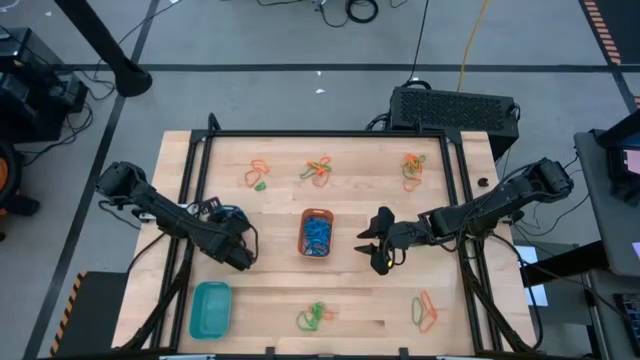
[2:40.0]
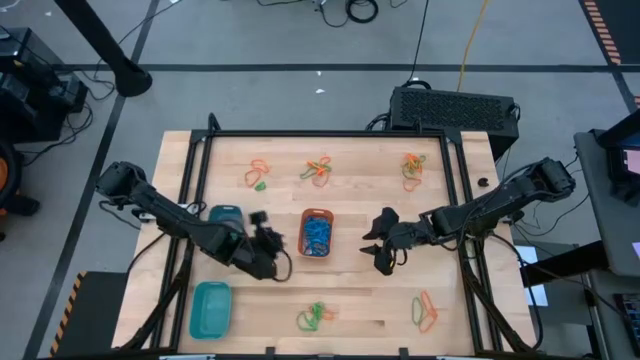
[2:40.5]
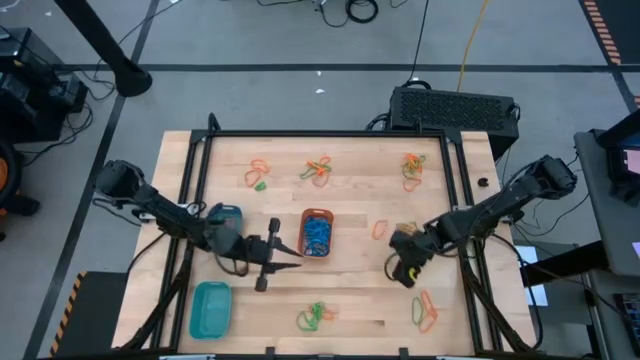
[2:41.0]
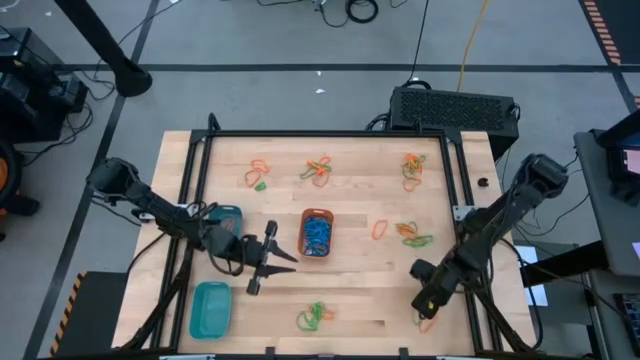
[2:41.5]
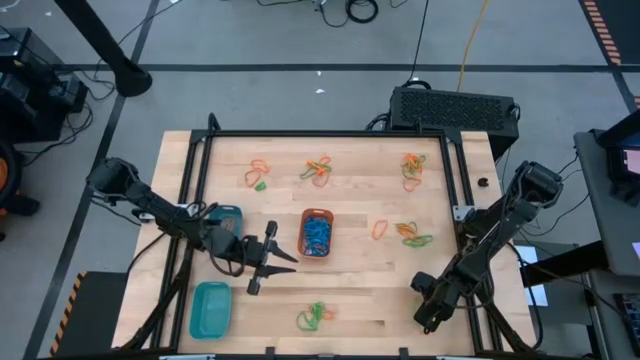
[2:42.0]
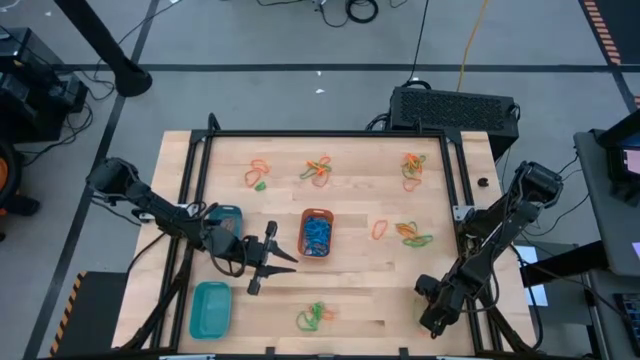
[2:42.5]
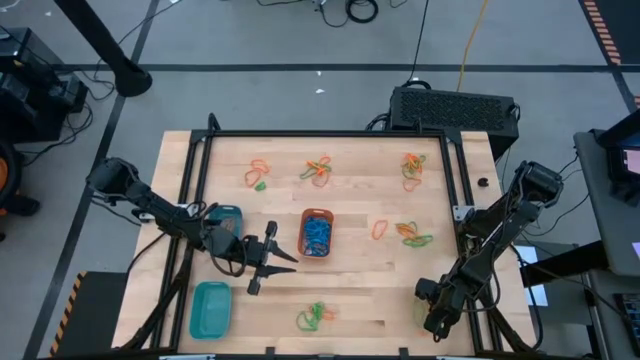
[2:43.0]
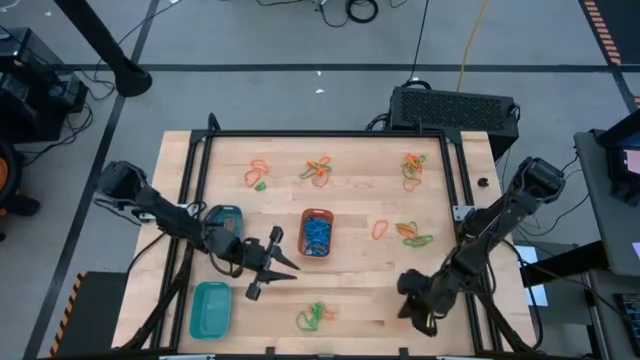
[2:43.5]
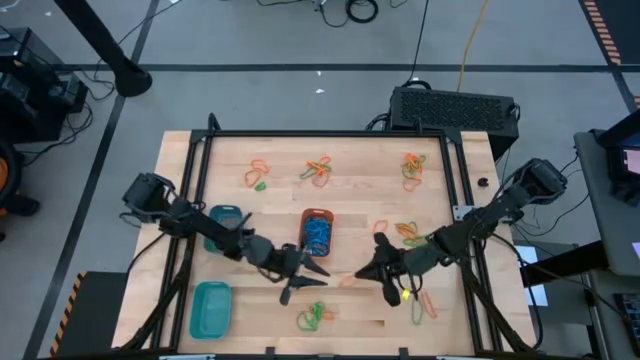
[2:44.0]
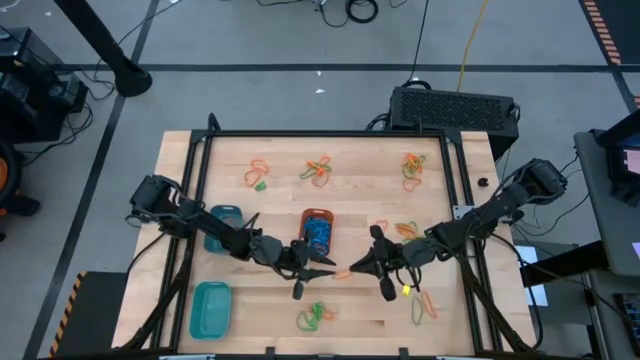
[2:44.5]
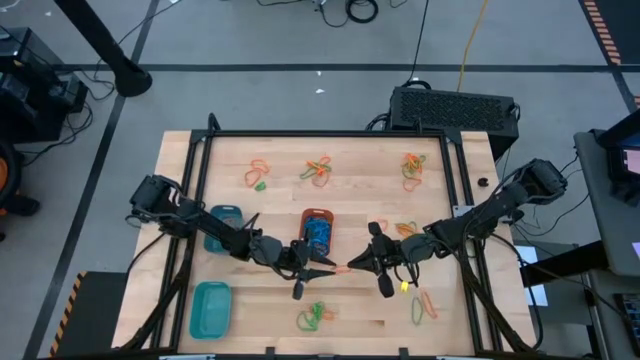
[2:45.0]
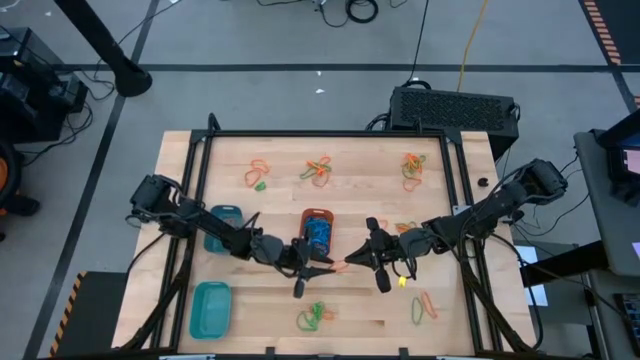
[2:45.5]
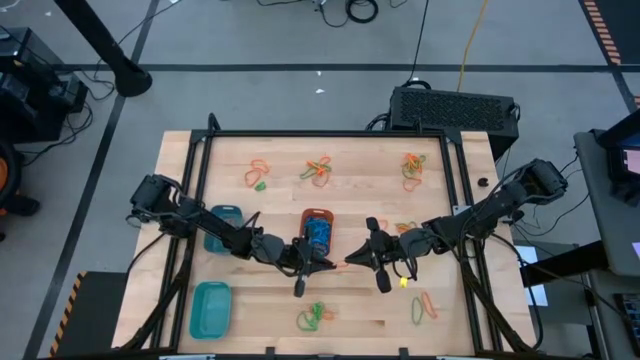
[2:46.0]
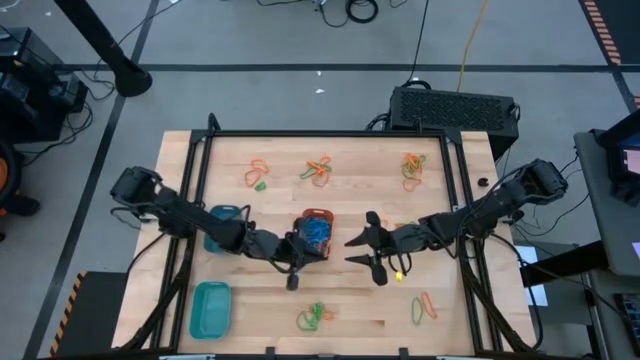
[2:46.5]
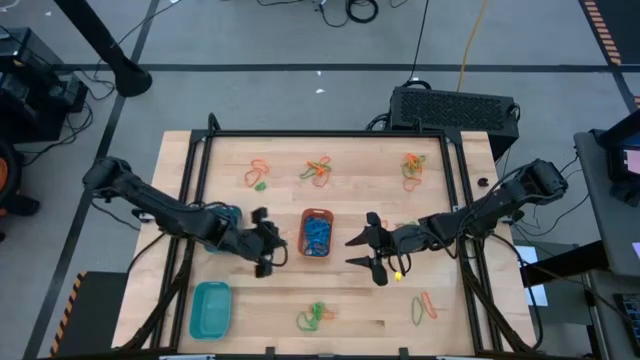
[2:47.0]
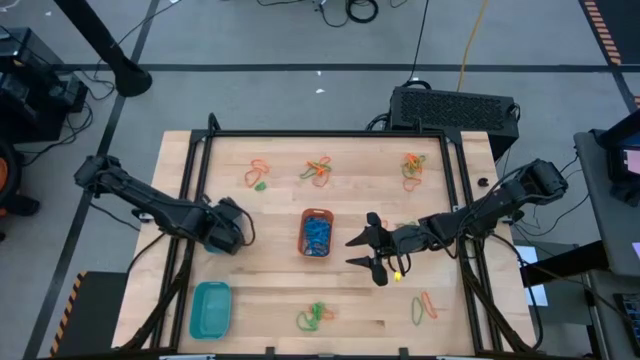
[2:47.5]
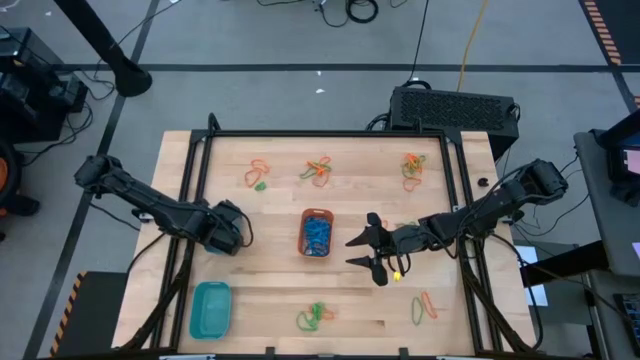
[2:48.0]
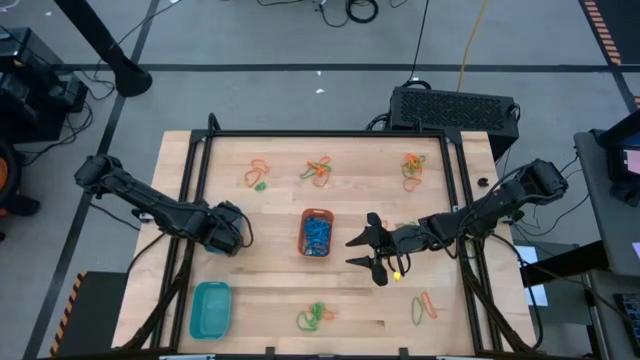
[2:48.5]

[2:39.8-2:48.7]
Task: Sort rubber bands into baskets
Put the orange rubber band into the blue bin

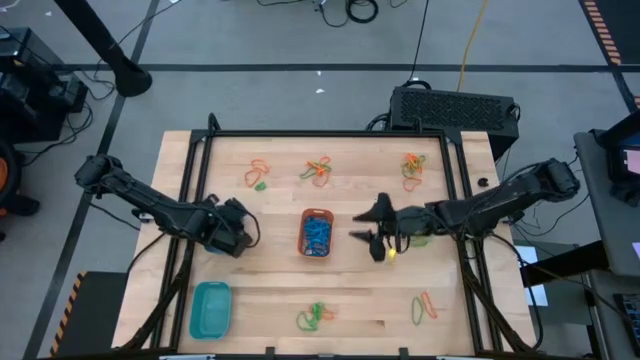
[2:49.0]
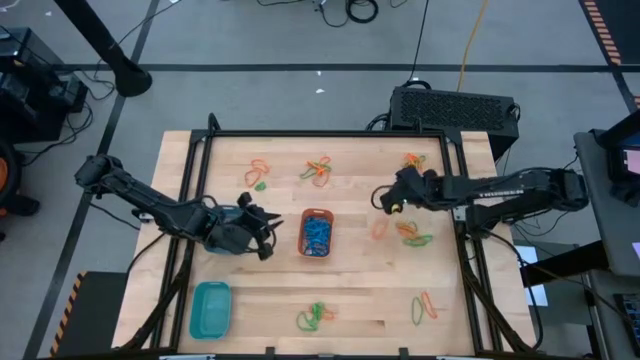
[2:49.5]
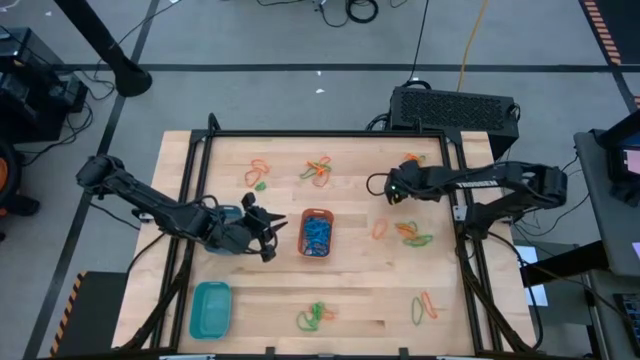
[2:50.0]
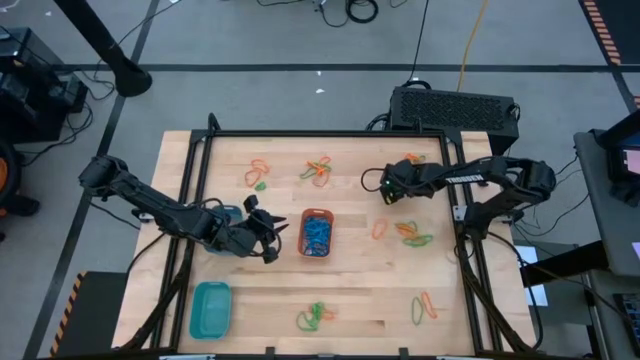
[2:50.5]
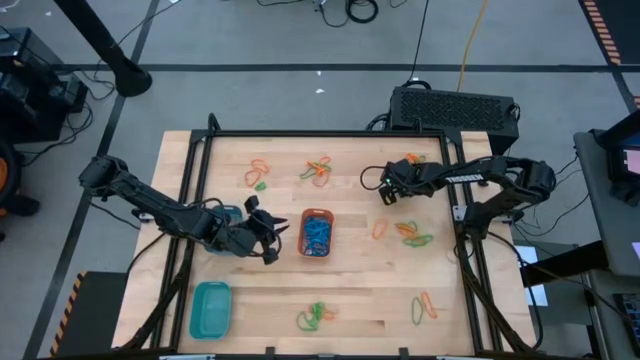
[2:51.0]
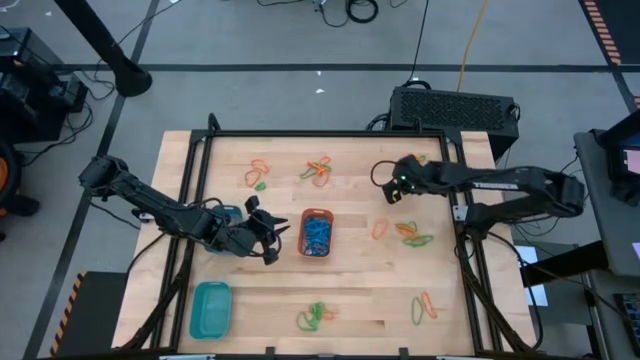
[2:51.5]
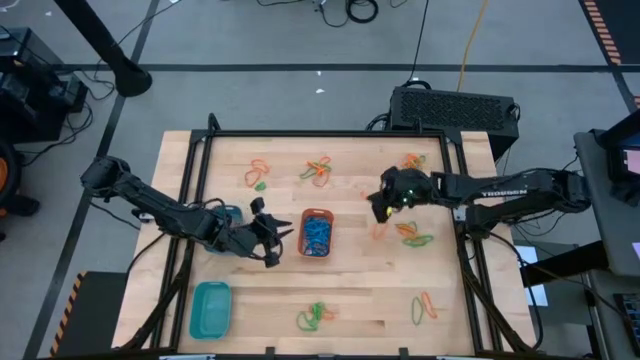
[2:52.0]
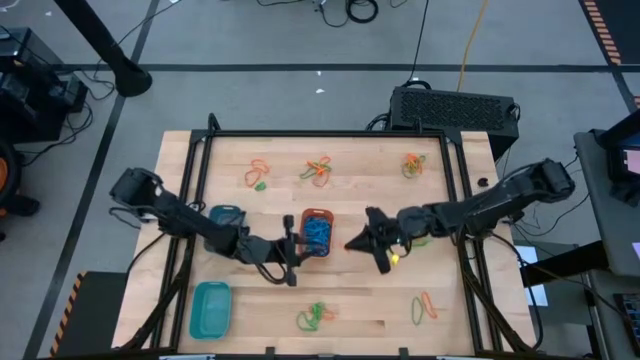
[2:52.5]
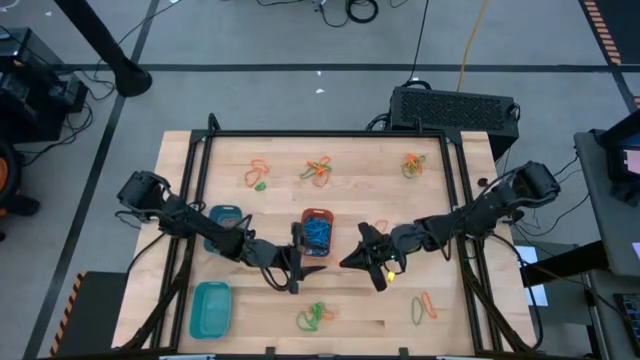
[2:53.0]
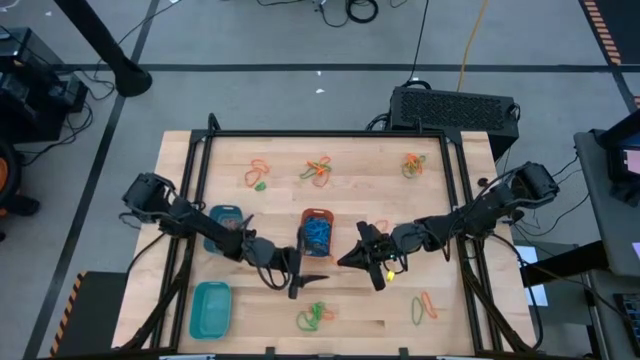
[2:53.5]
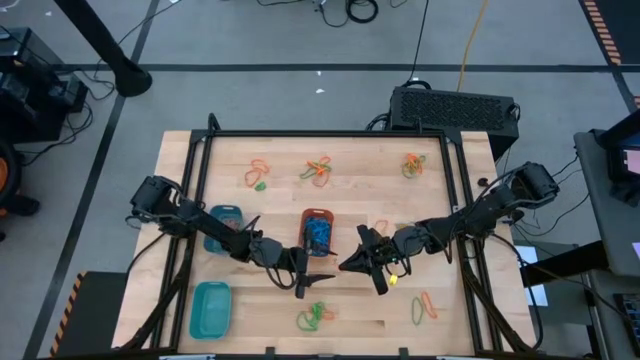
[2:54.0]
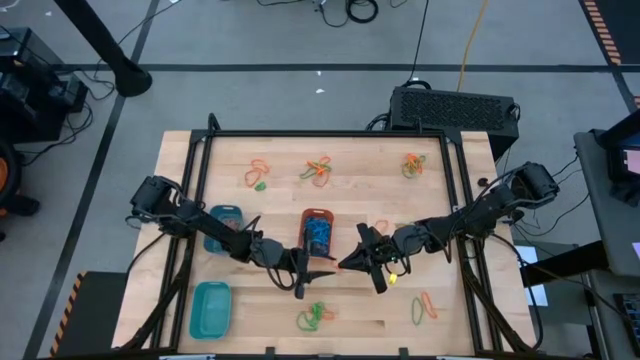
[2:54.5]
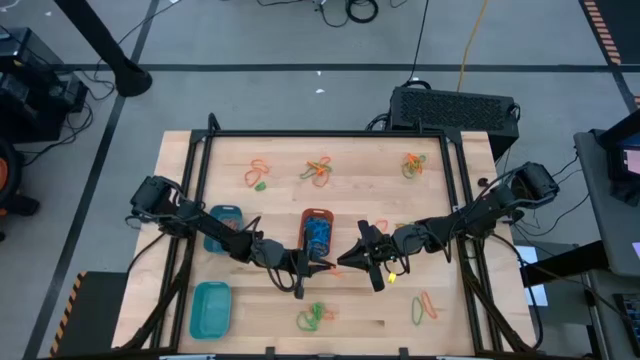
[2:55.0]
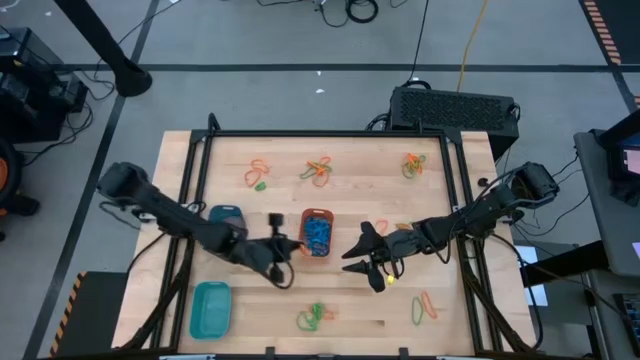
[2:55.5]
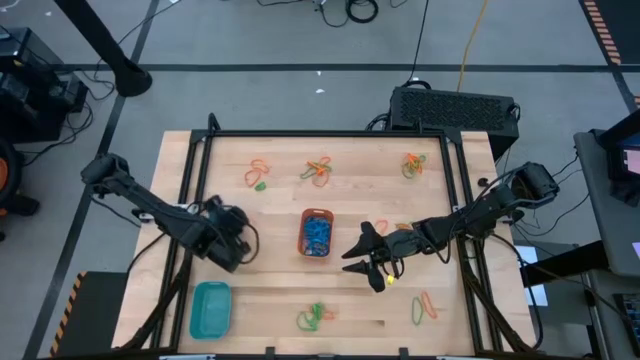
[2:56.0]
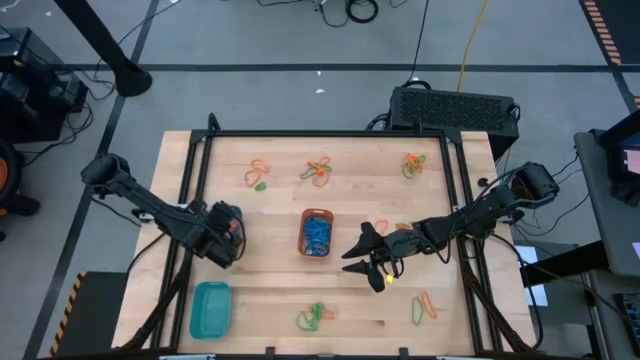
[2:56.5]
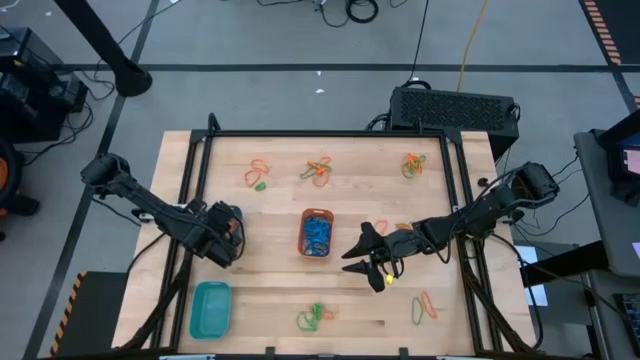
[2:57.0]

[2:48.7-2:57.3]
Put the orange rubber band into the blue bin

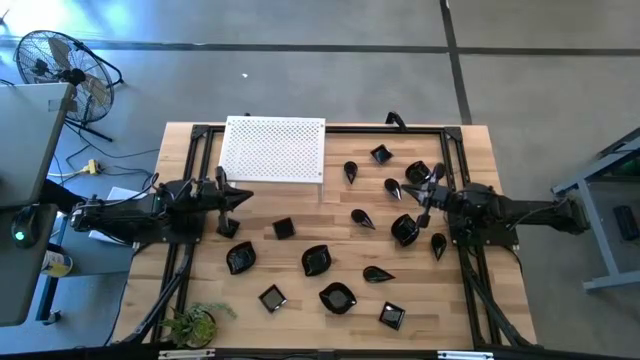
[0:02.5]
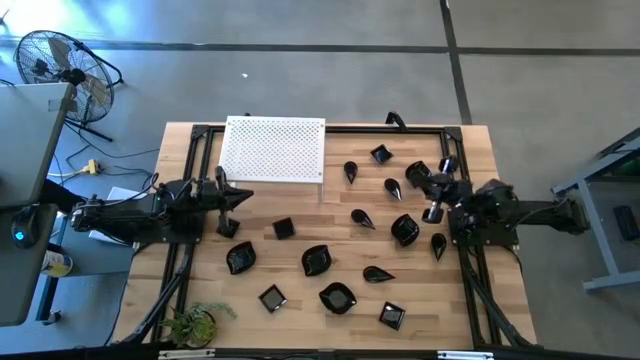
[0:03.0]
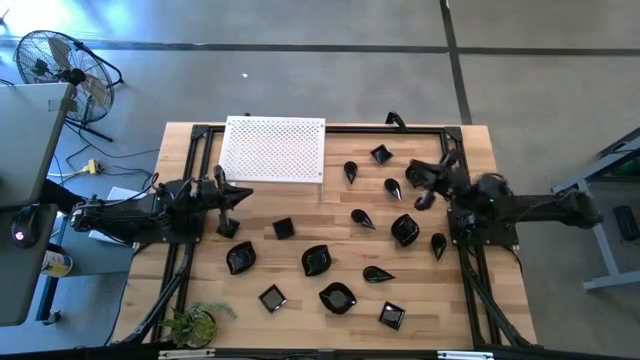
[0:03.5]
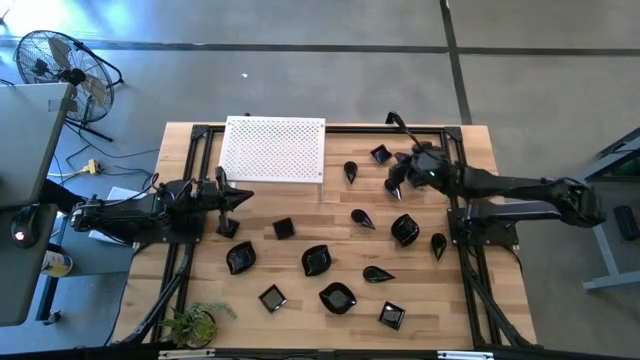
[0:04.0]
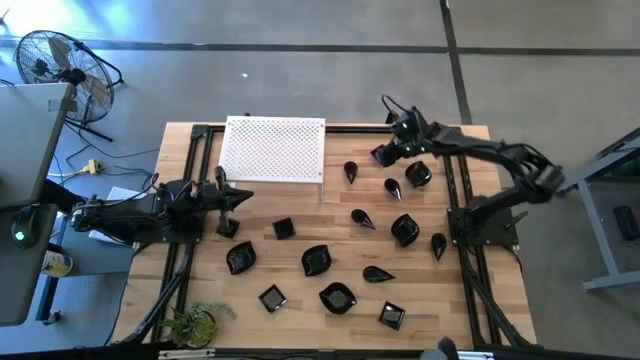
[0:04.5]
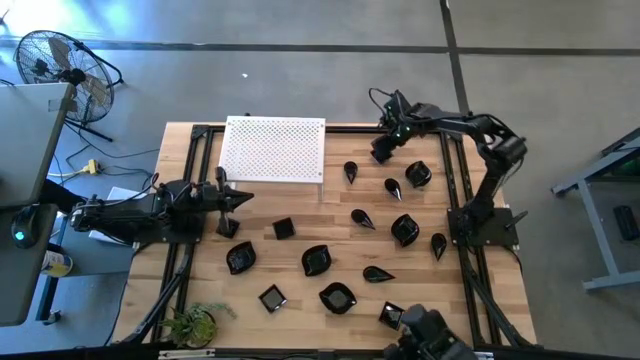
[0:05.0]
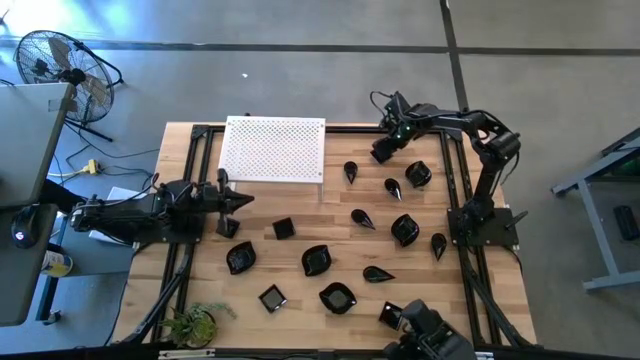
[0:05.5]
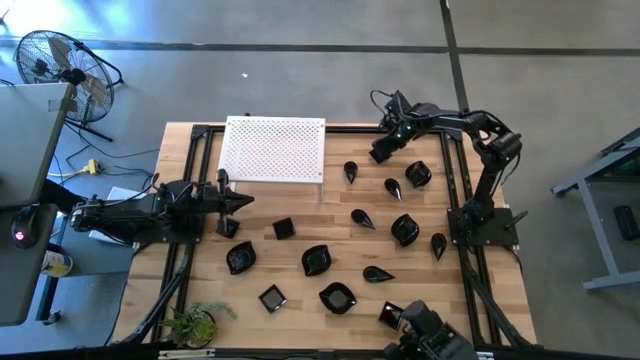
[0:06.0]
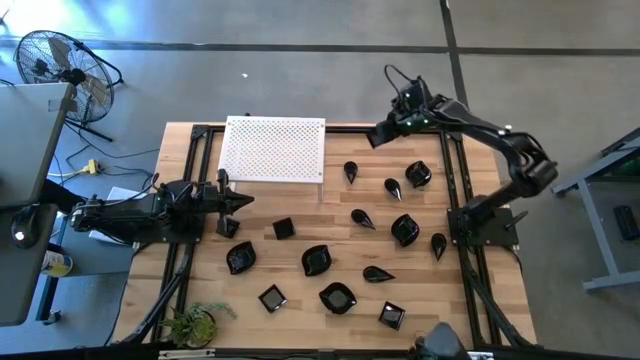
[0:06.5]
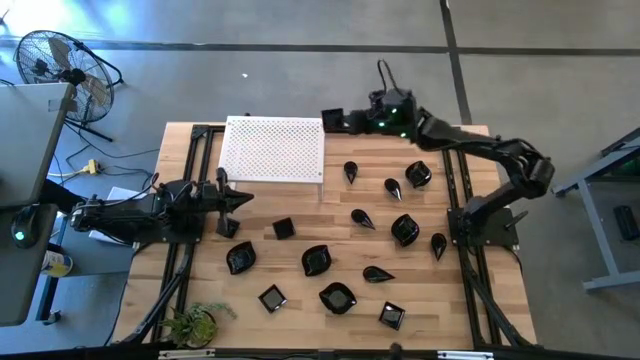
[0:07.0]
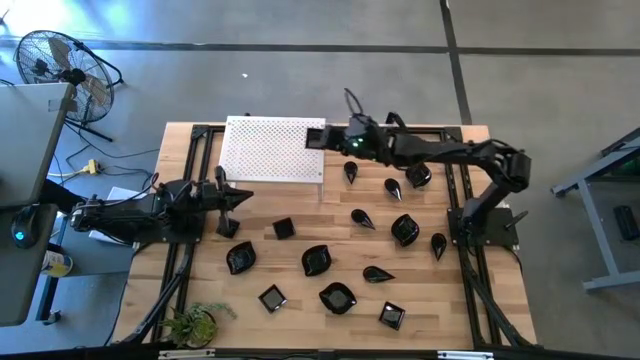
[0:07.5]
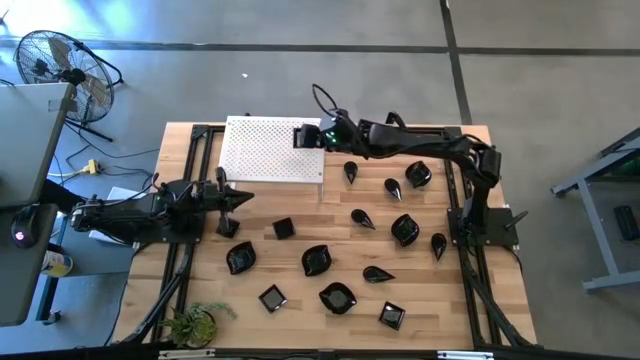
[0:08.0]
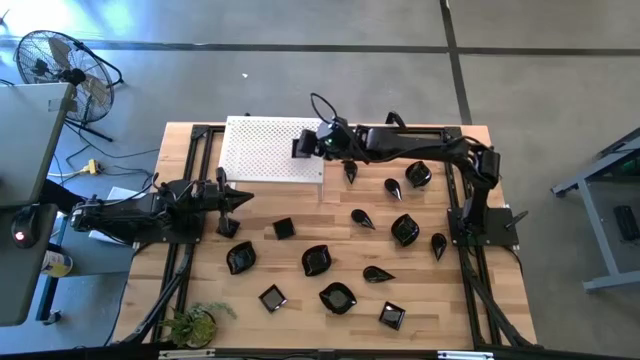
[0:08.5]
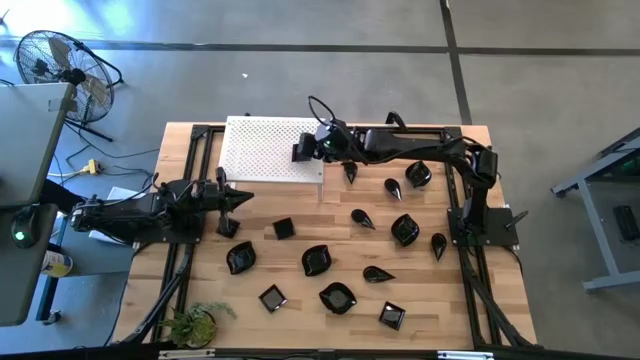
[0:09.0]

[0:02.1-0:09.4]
Task: Pick & Place Mini shaped plates
Put the square plate on the shelf
